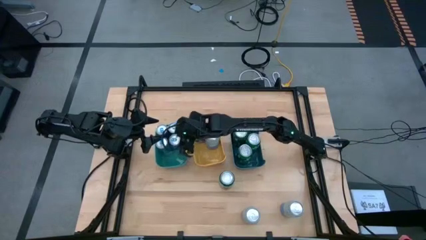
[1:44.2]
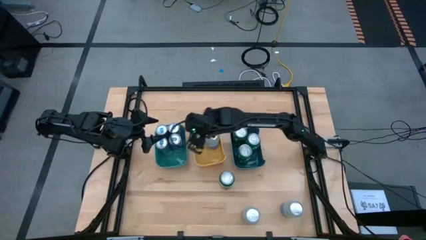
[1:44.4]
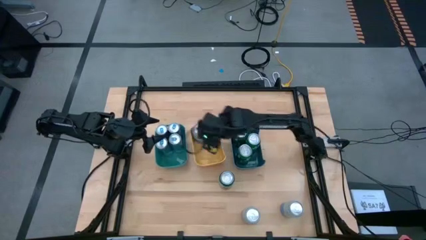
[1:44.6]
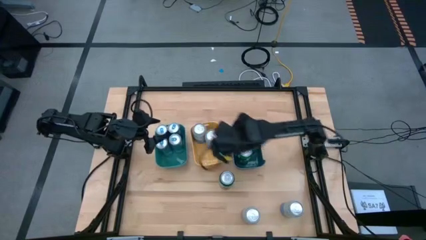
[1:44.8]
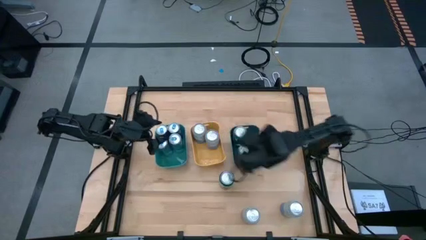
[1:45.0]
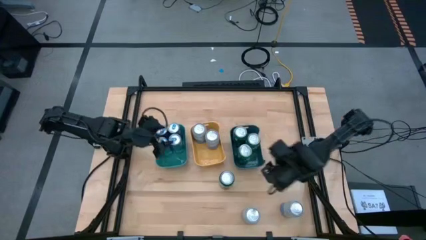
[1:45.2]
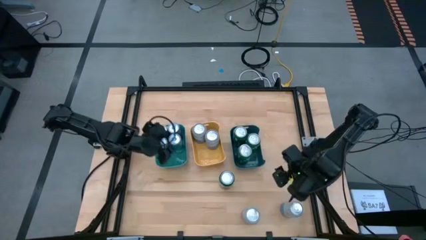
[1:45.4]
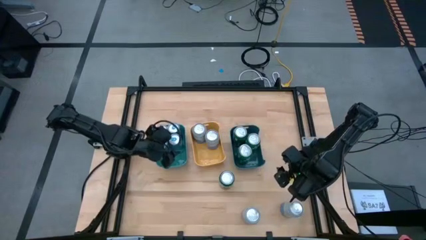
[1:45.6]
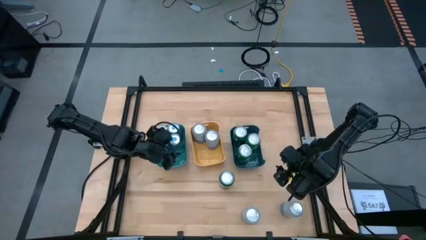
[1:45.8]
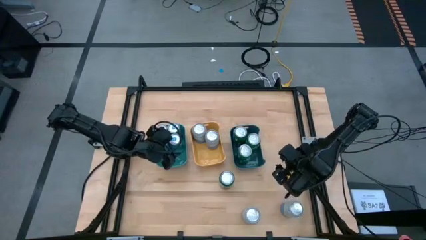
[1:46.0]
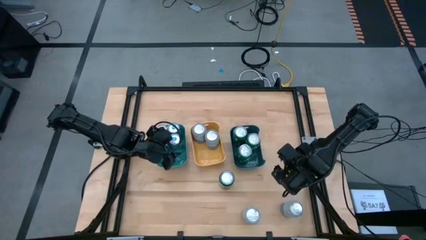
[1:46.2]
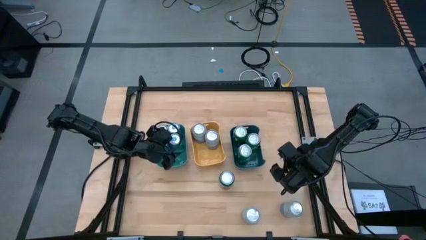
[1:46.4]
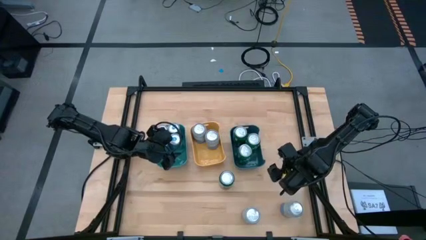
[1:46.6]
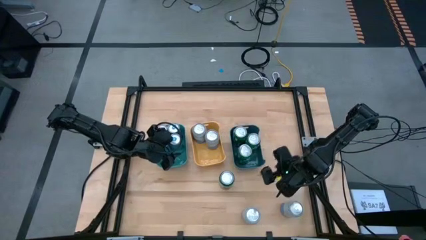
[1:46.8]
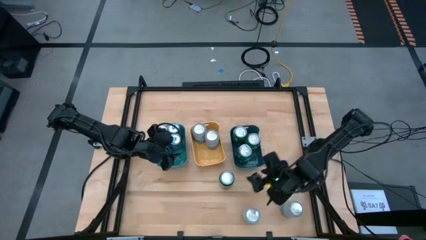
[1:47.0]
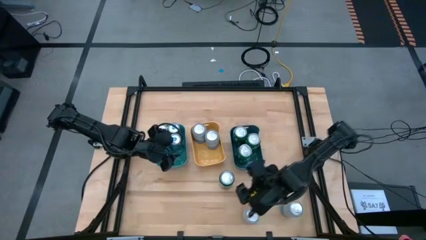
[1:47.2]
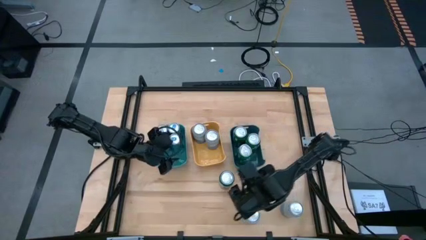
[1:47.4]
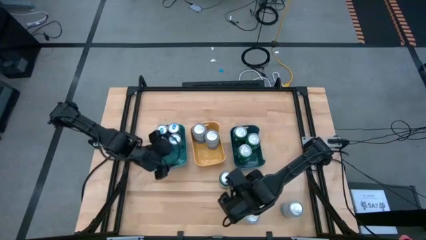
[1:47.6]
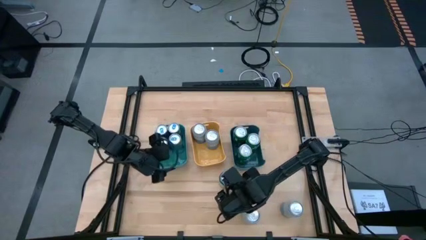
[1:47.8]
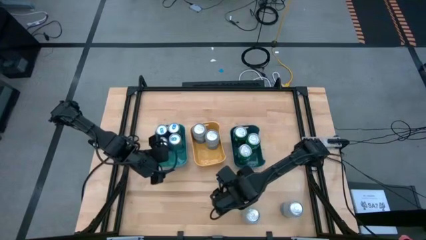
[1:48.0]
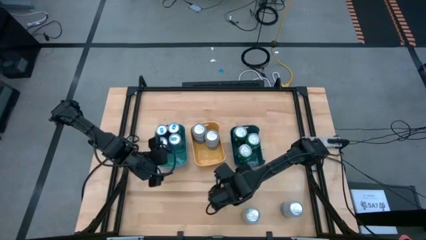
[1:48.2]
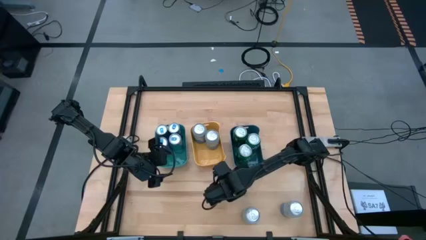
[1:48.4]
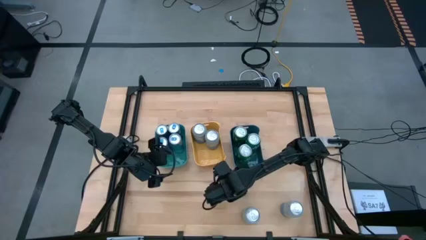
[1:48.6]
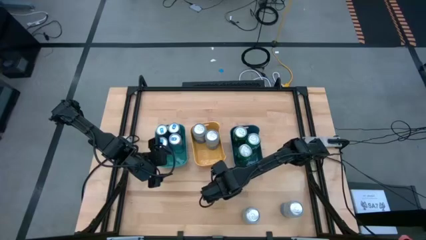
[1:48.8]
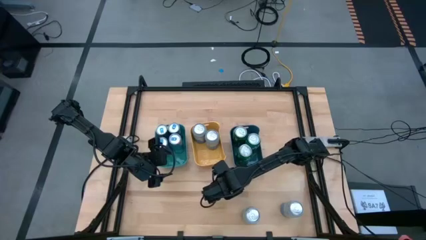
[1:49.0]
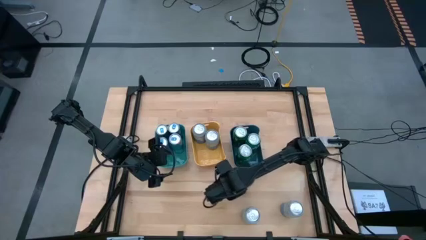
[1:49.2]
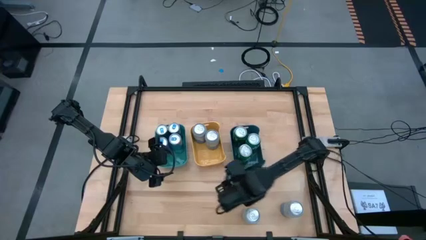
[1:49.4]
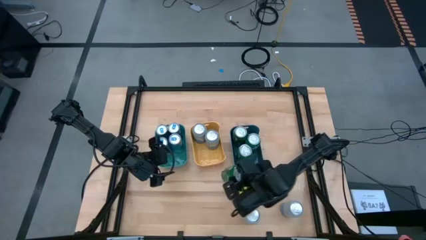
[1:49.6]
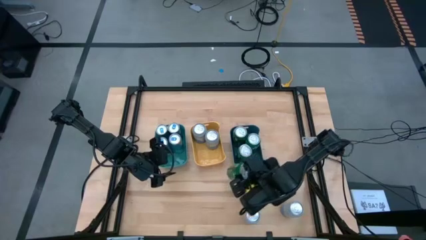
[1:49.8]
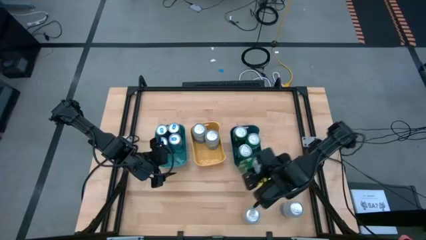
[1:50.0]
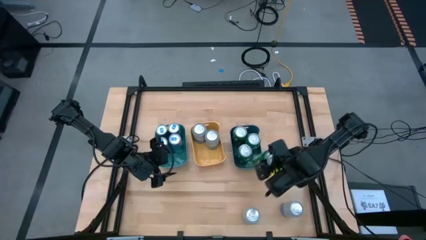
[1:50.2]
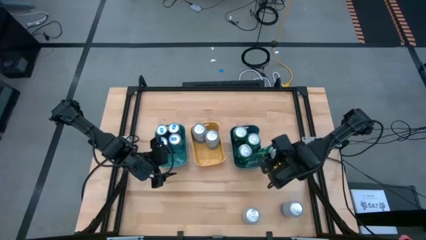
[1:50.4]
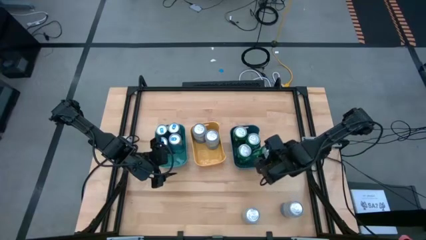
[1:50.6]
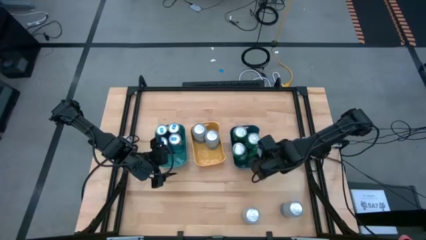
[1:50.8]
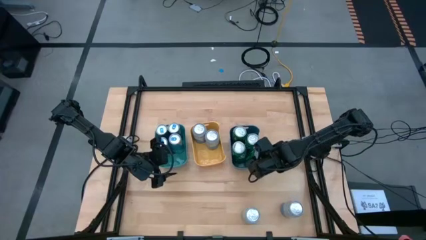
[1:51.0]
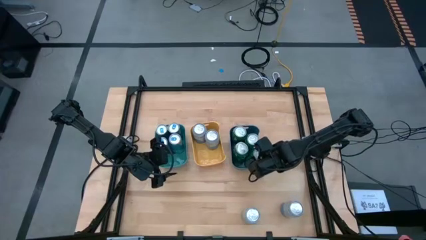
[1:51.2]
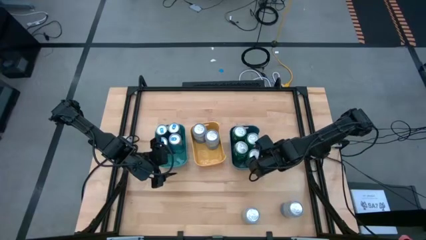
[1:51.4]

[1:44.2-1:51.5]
Task: Sort soda cans
Put the green soda can into the blue bin

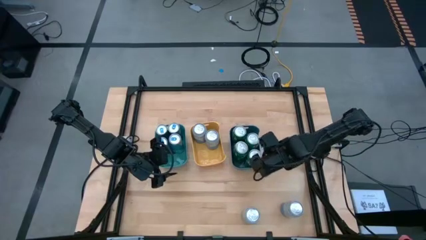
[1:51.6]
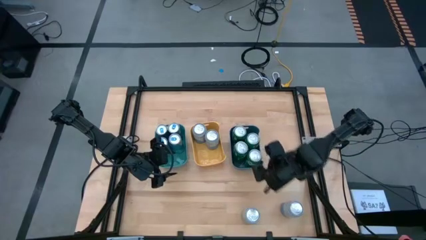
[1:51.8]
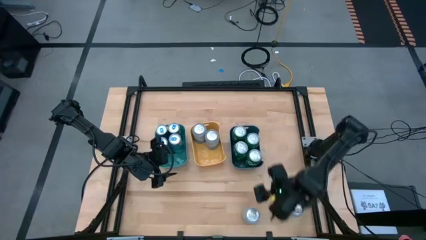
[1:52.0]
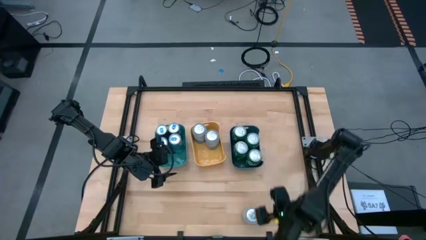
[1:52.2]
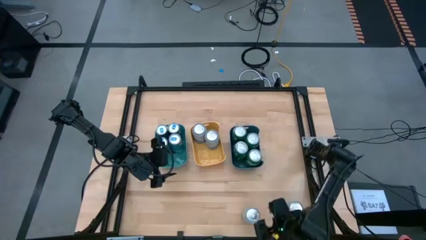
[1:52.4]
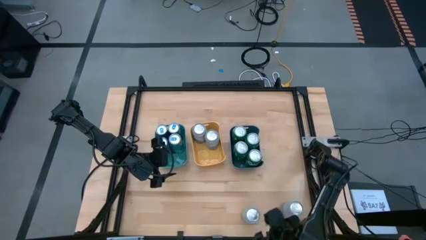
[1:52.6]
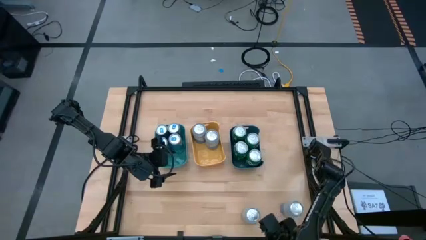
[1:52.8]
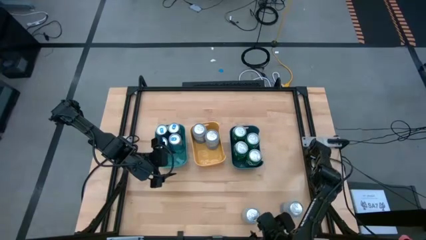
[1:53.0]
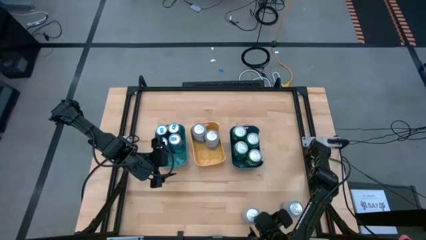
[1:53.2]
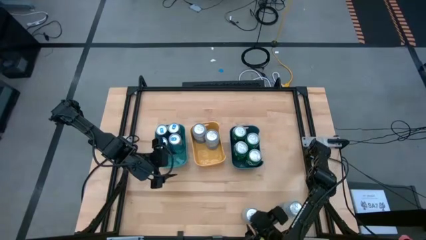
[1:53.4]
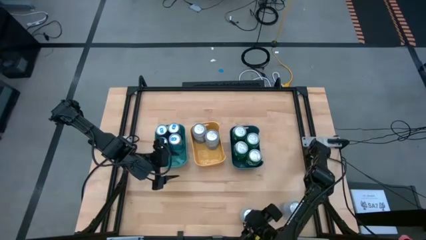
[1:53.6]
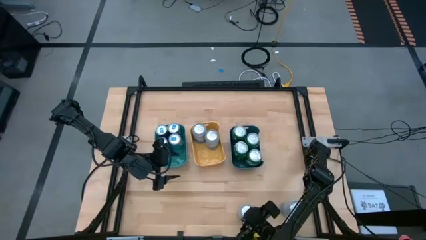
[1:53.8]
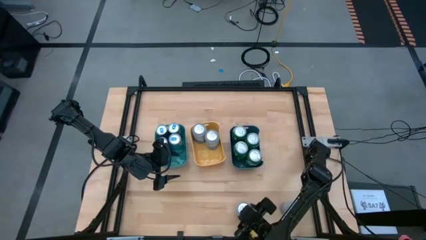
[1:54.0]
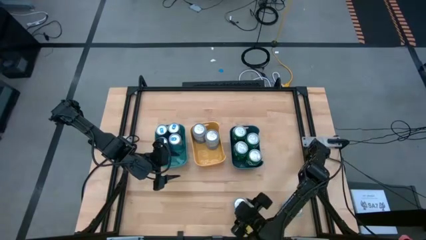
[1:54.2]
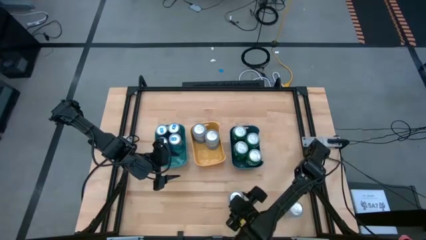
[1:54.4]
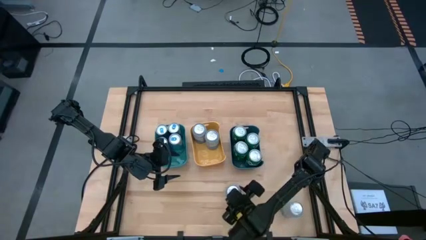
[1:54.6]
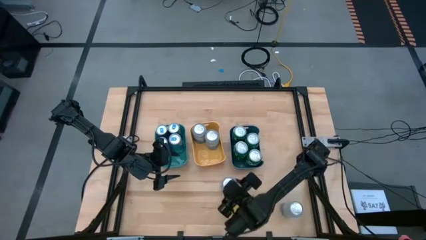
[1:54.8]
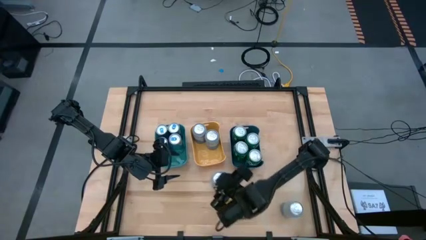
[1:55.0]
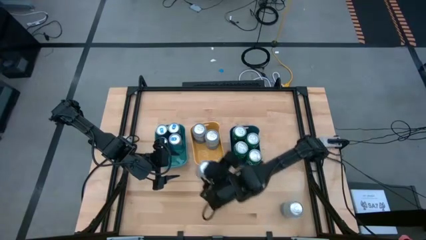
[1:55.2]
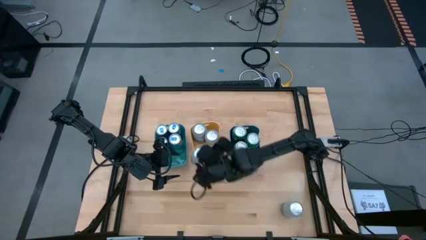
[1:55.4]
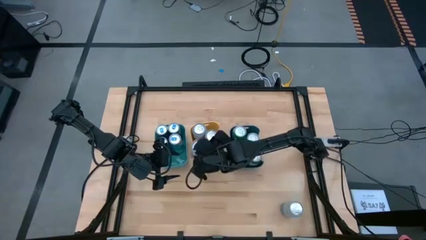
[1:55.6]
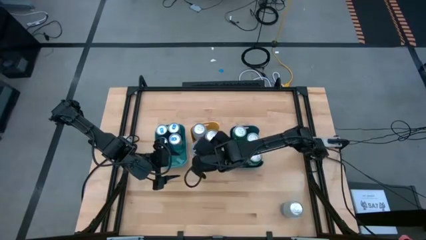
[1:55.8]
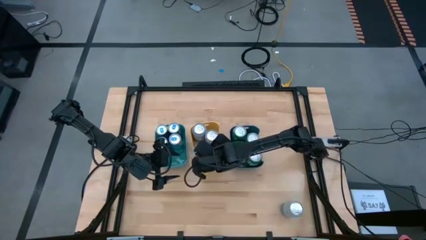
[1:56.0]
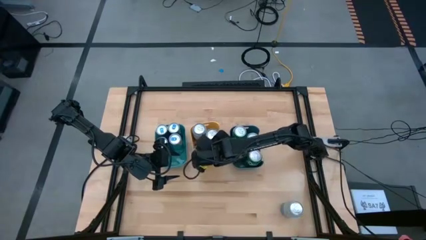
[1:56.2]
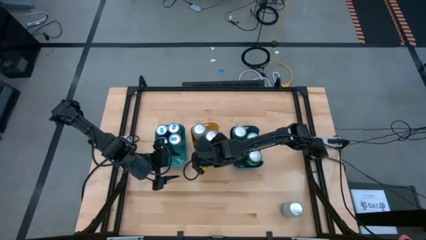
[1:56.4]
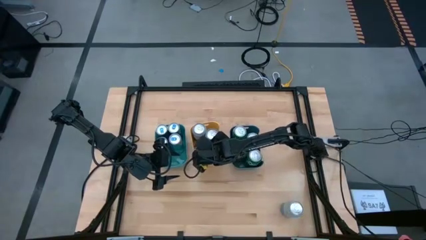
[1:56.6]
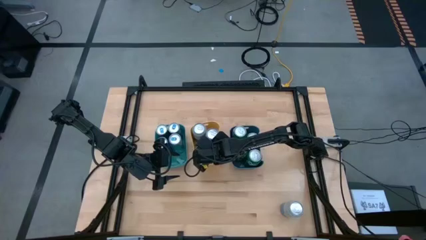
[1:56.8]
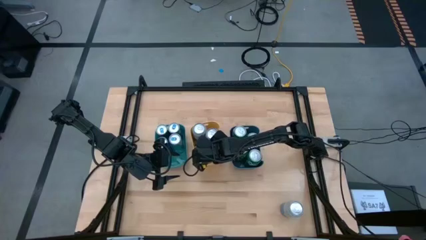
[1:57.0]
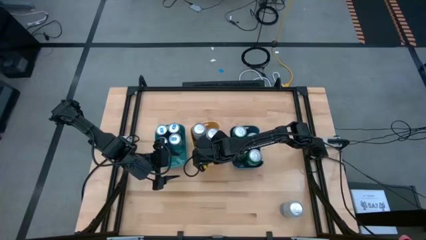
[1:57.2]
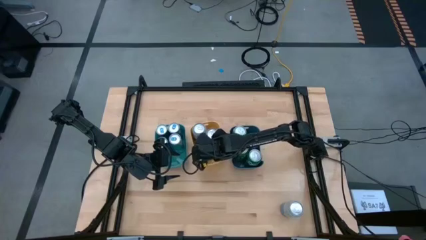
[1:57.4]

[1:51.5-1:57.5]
Put the blue-white soda can into the yellow bin

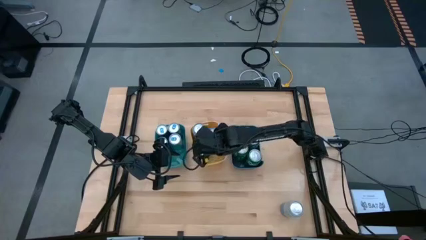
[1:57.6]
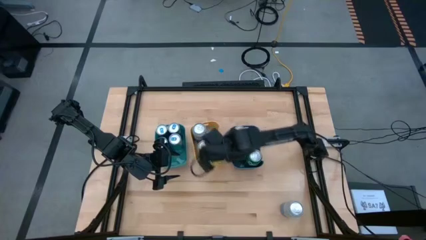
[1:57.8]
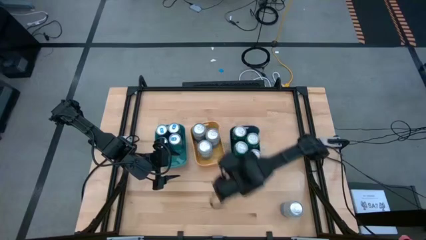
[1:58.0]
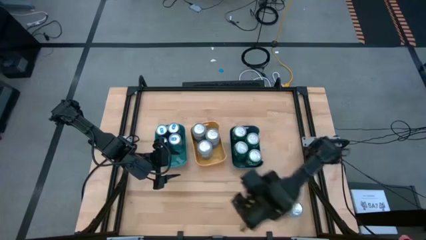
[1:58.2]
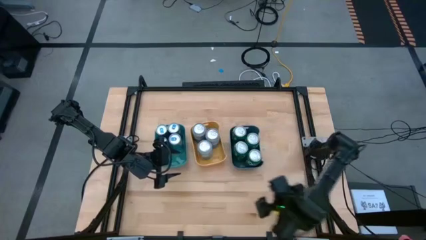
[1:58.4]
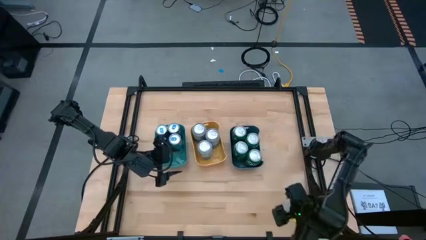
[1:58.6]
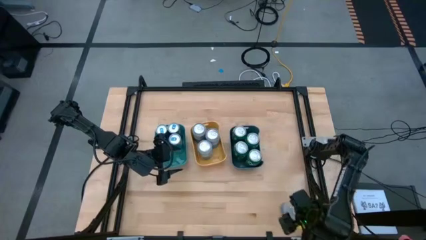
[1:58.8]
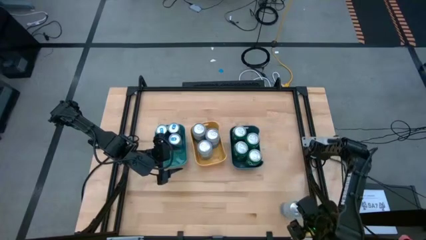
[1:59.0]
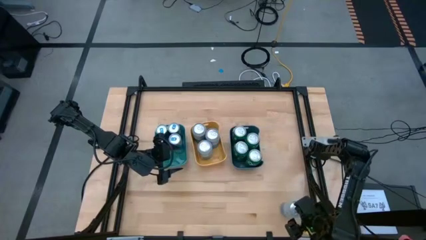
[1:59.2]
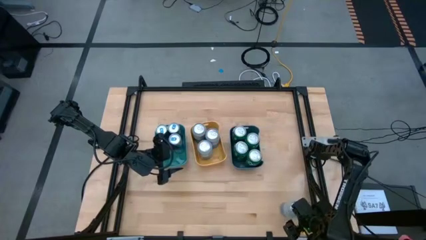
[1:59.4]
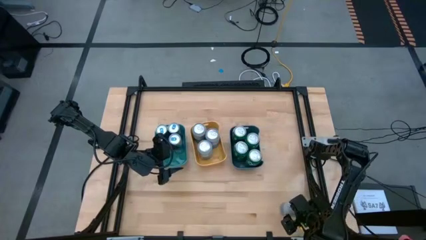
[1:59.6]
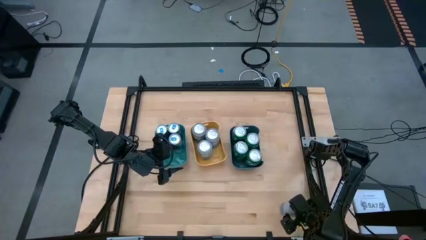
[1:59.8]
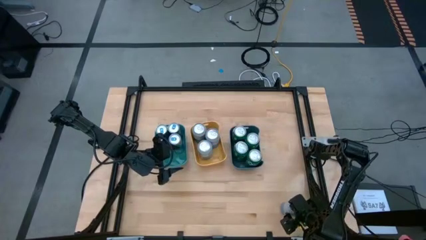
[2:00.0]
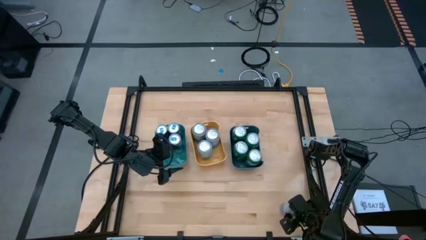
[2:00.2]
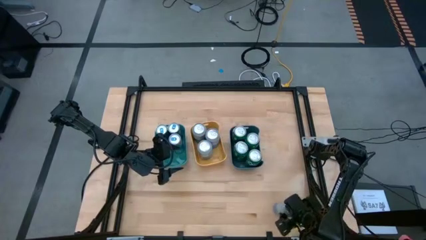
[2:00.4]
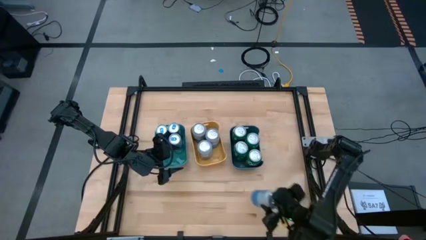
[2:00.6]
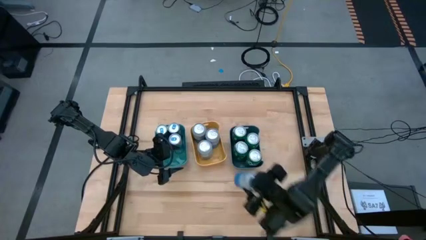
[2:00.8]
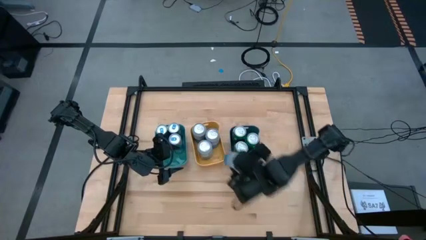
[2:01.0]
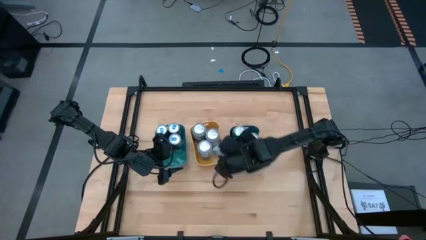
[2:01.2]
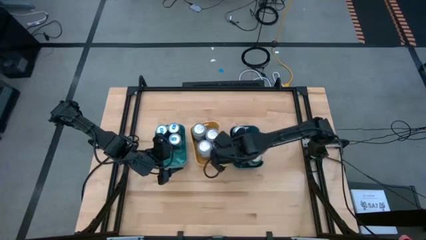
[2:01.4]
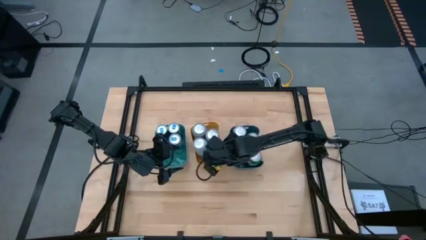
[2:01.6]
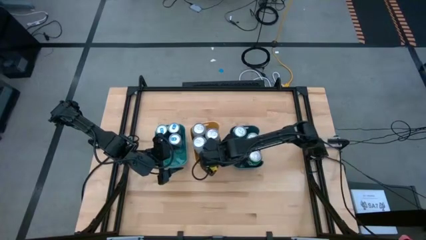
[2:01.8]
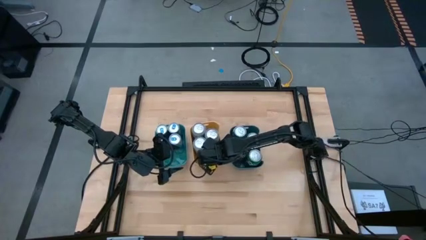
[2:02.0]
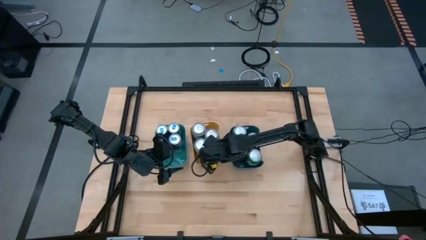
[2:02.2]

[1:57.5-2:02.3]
Put the blue-white soda can into the yellow bin
